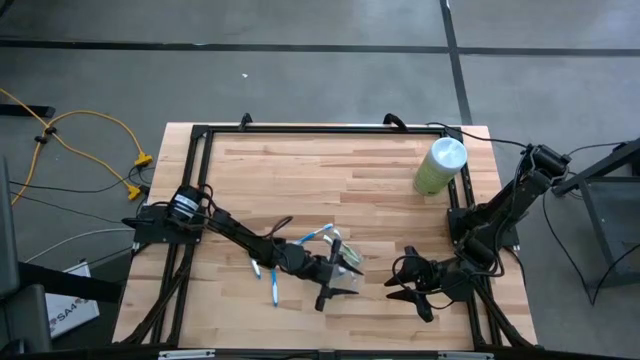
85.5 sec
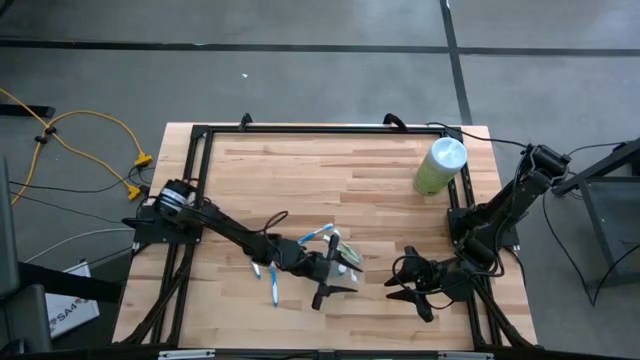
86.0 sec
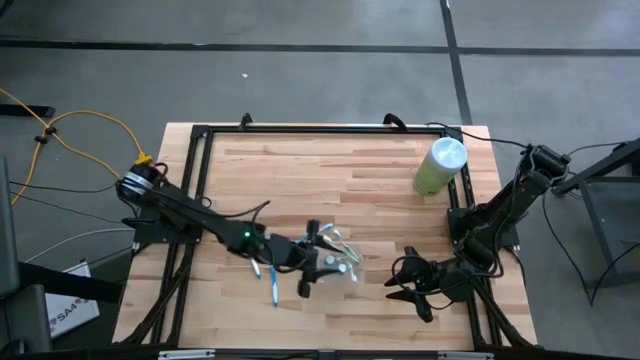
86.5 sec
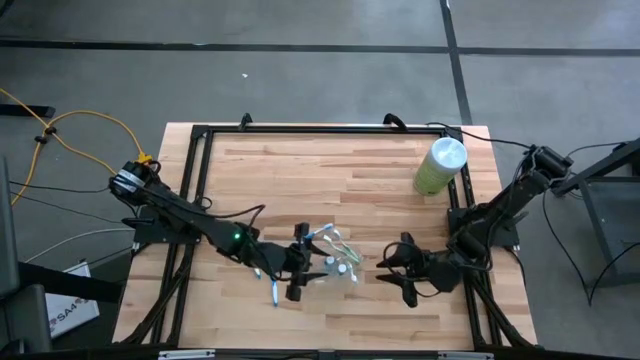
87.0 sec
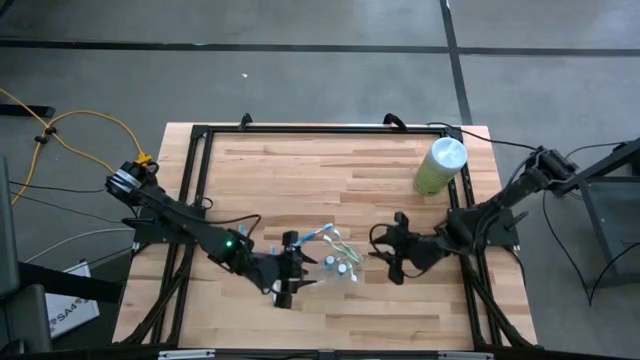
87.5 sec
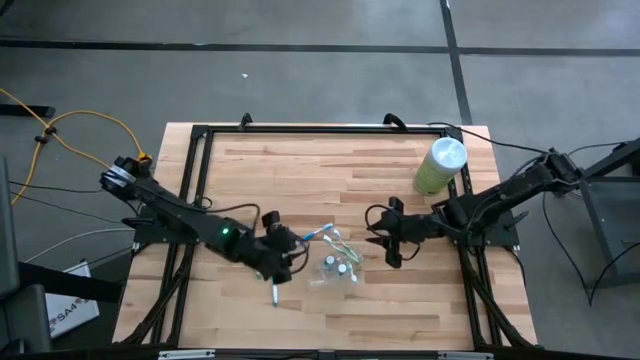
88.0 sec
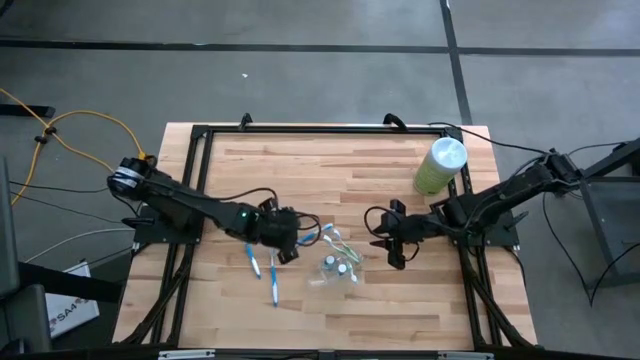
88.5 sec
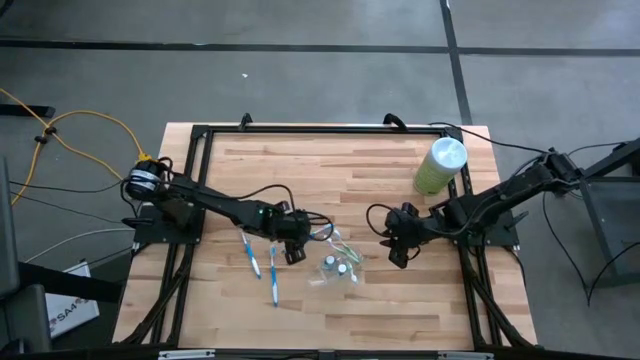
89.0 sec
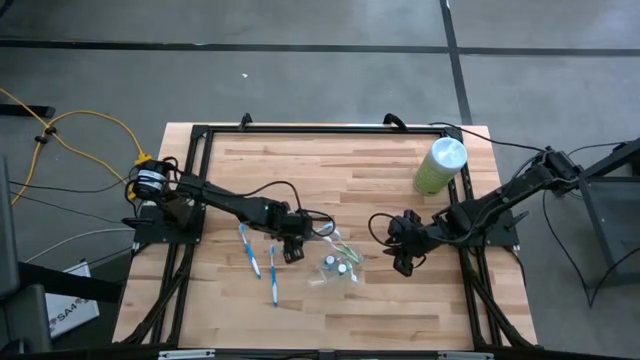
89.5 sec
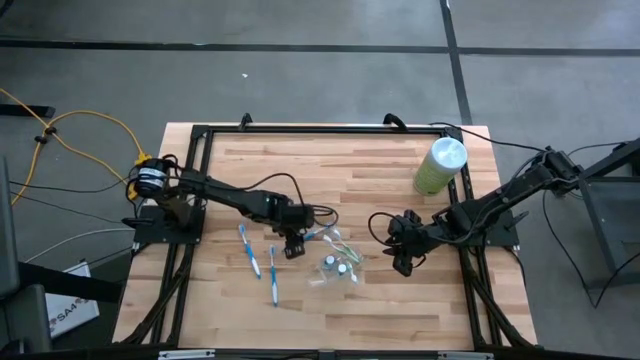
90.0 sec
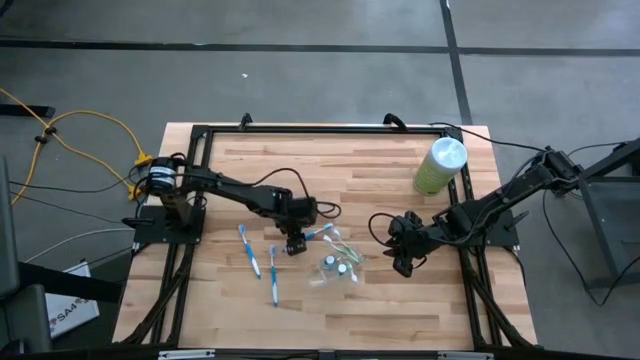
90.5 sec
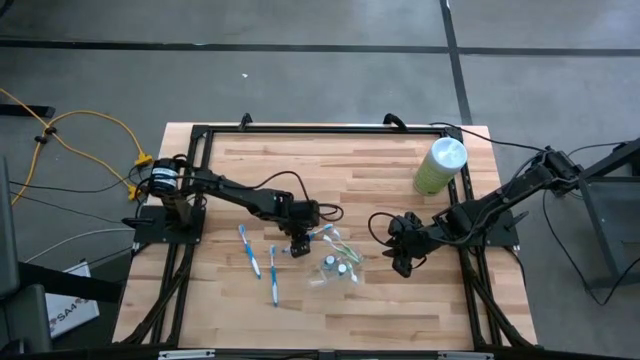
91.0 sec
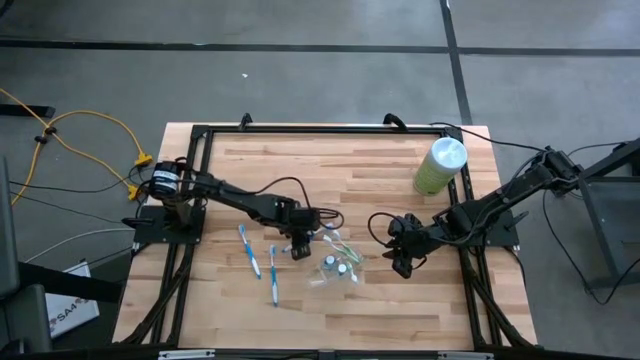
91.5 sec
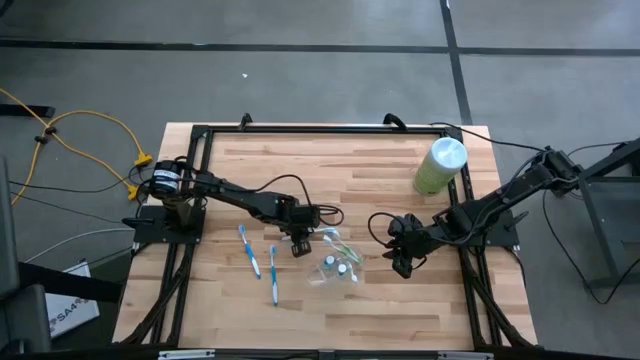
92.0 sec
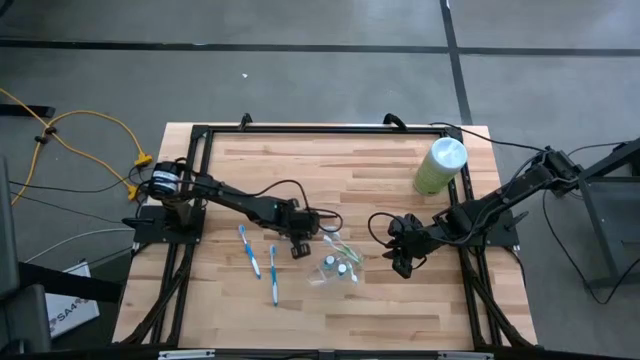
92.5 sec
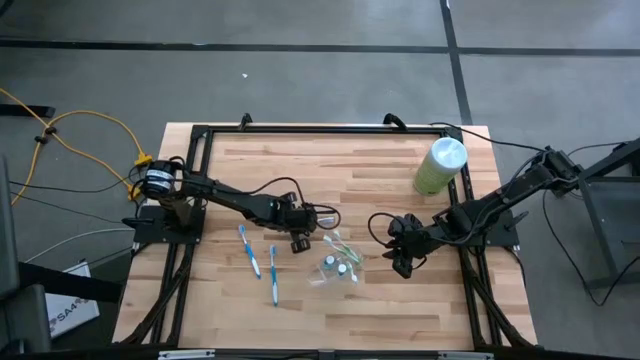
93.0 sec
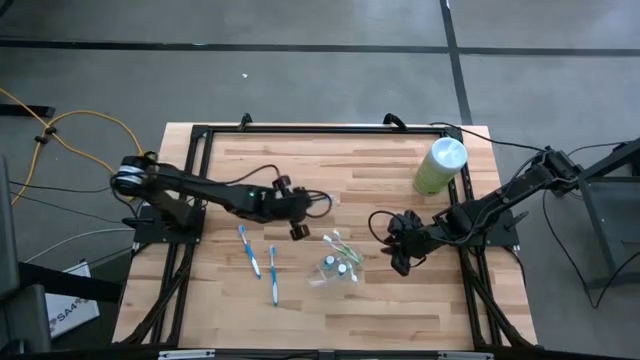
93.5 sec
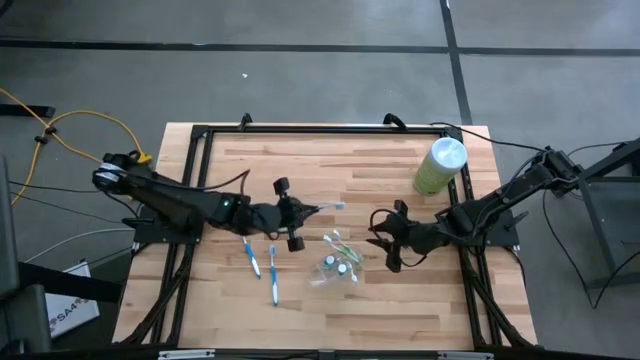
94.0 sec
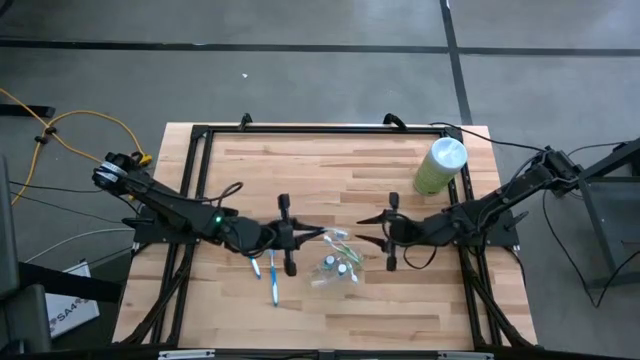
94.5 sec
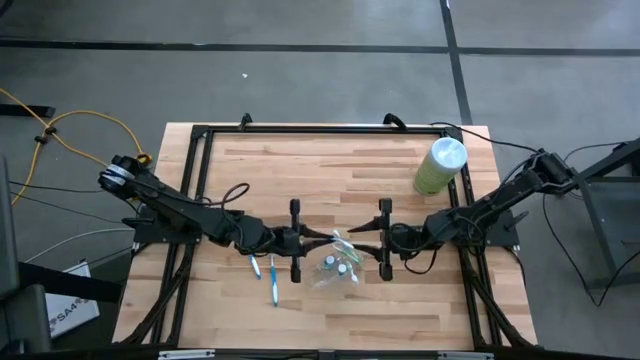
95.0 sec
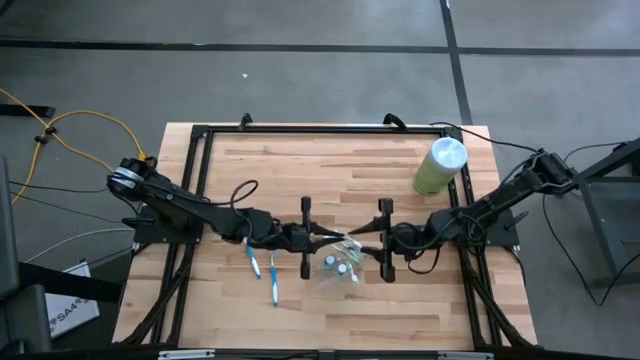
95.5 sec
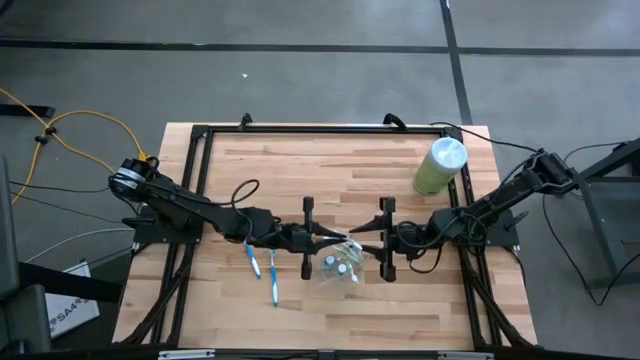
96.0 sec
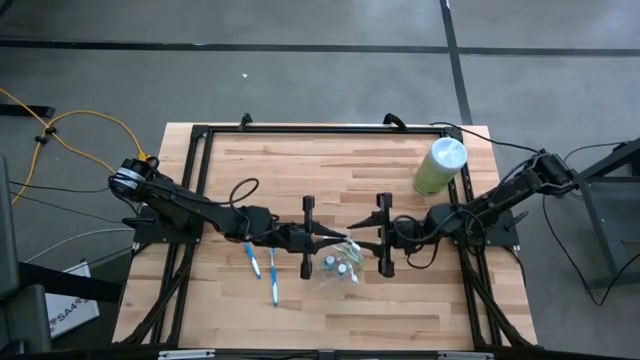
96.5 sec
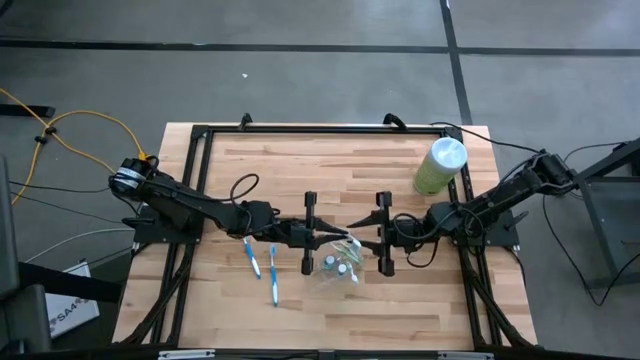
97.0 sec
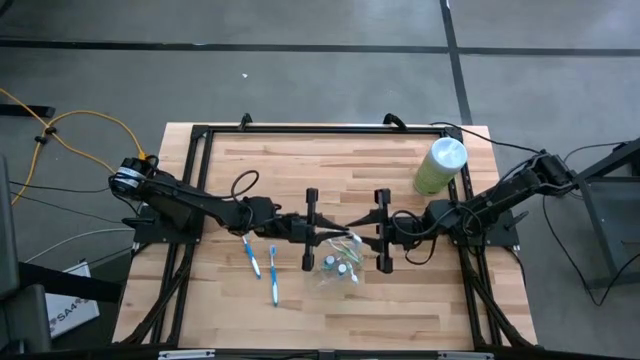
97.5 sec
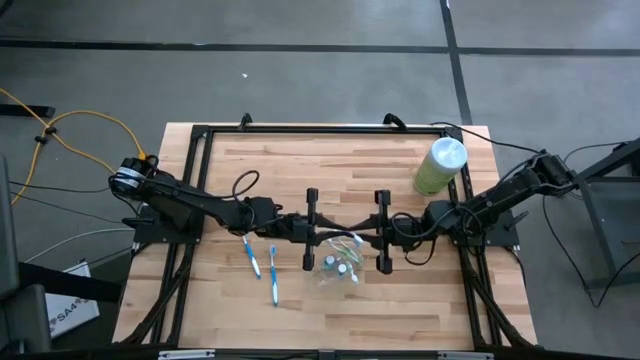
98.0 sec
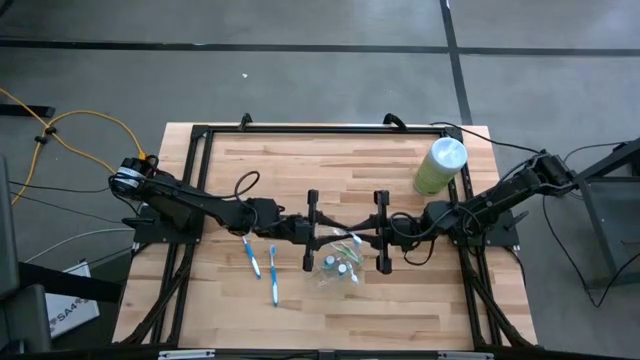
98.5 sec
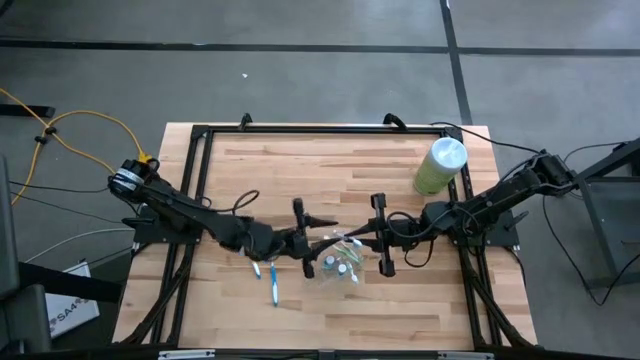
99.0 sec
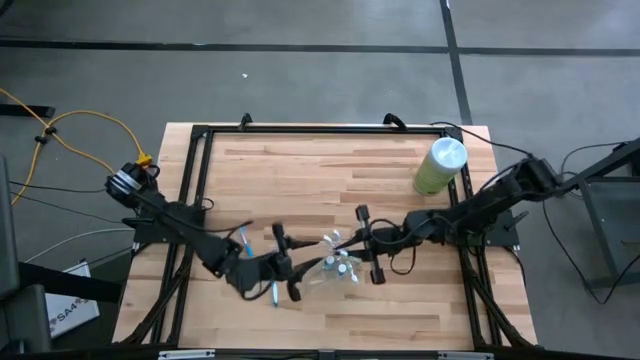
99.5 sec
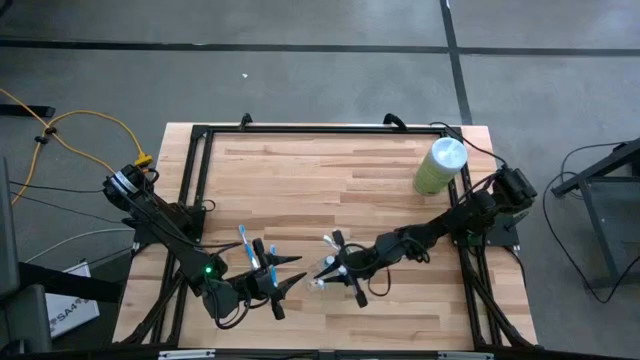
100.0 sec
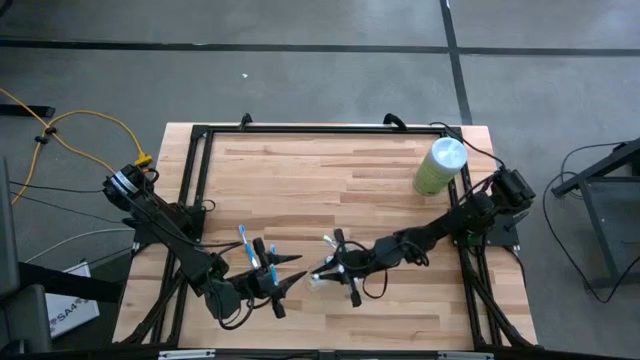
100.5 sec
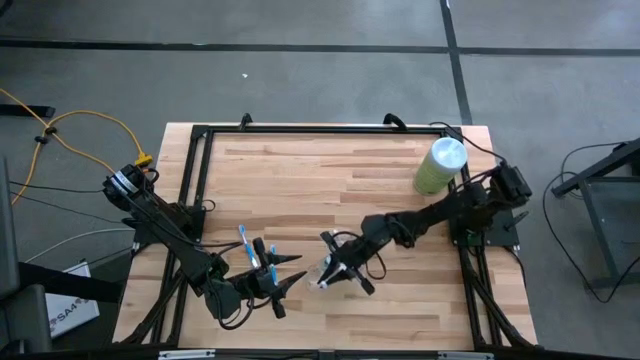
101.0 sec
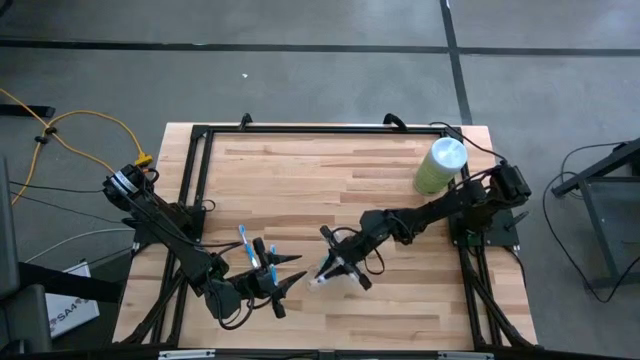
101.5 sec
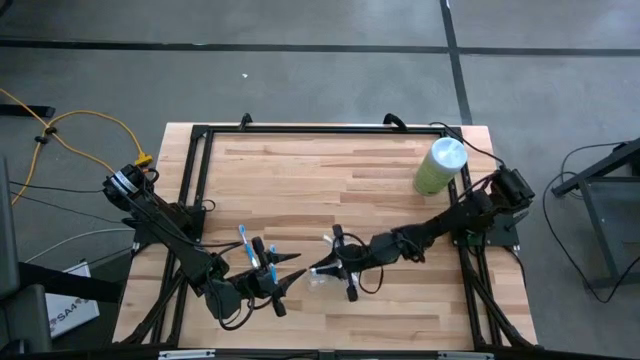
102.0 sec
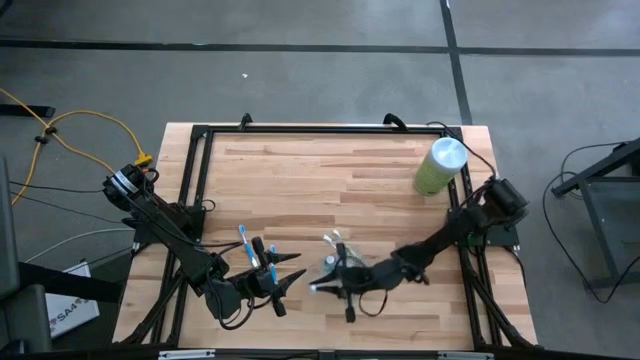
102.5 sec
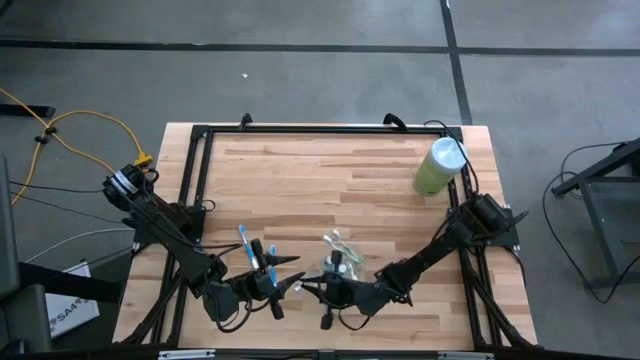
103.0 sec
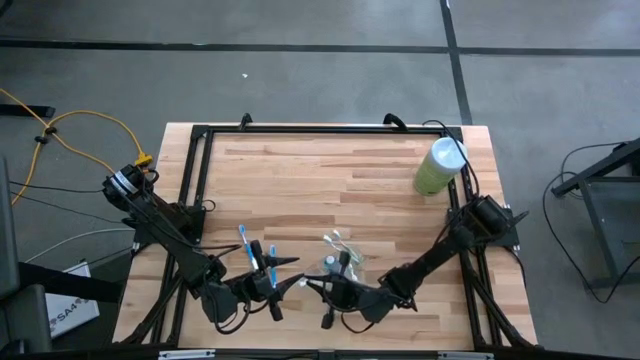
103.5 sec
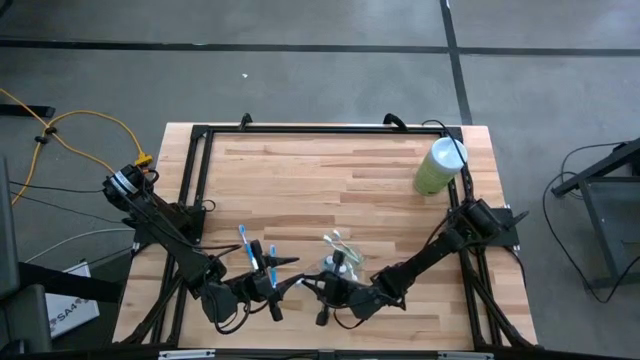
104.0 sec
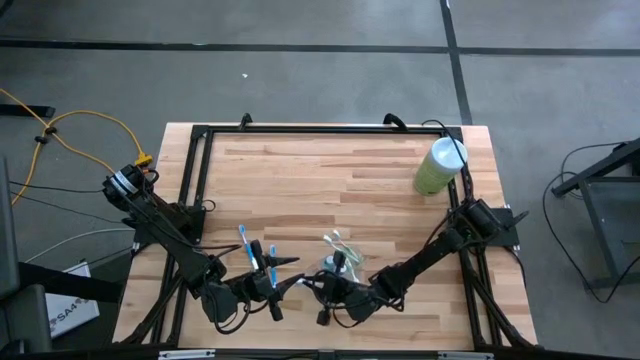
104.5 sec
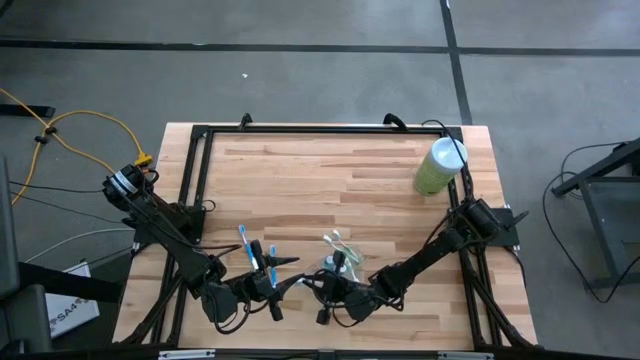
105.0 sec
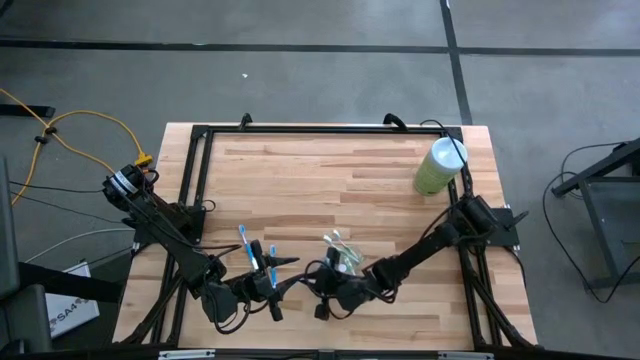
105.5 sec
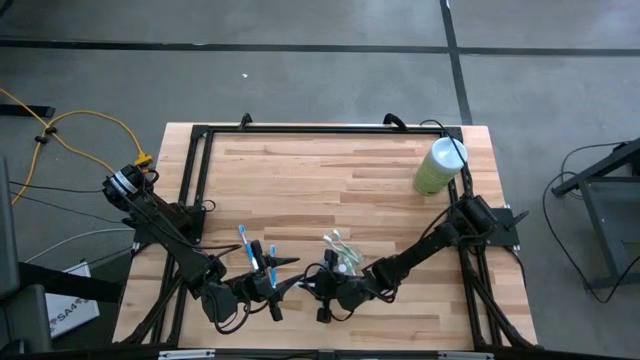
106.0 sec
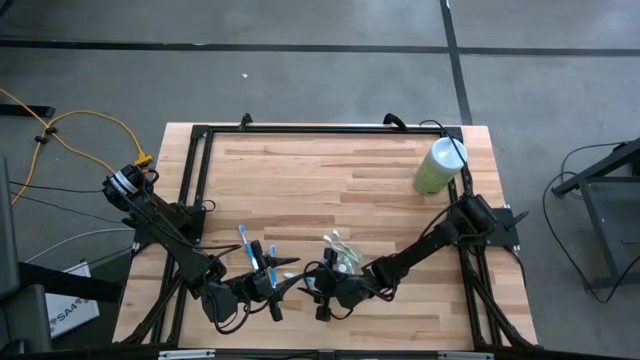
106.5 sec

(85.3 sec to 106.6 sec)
Task: Pick & Place toothbrushing station
Put the top right blue toothbrush into the transparent organizer
